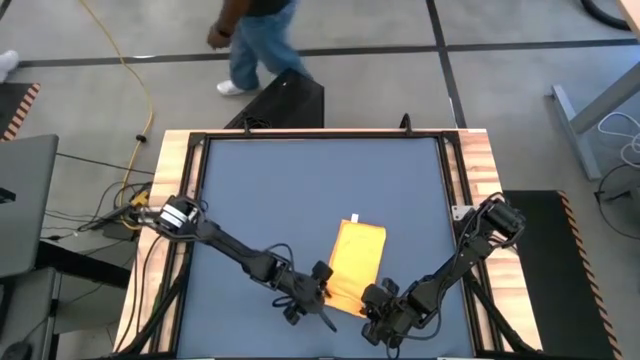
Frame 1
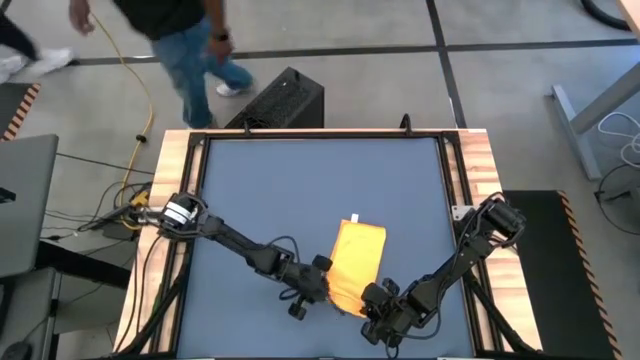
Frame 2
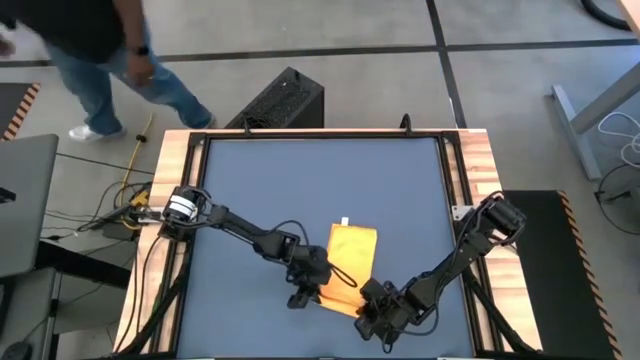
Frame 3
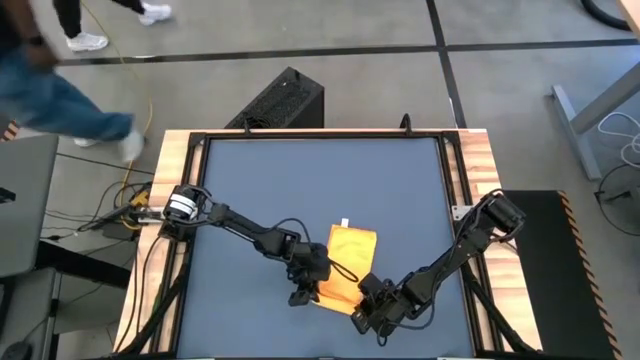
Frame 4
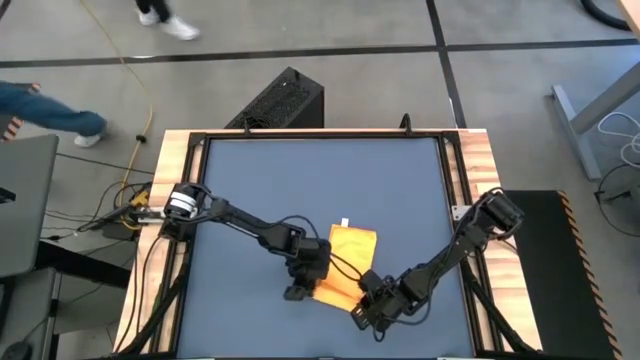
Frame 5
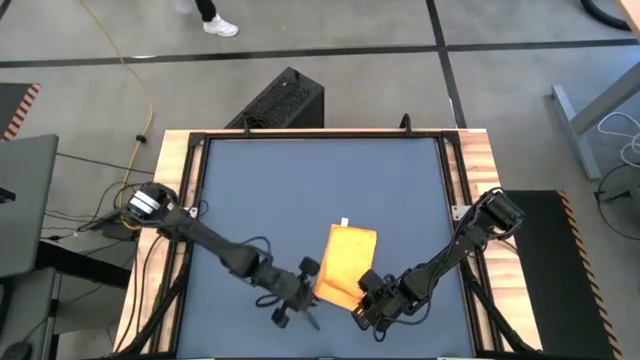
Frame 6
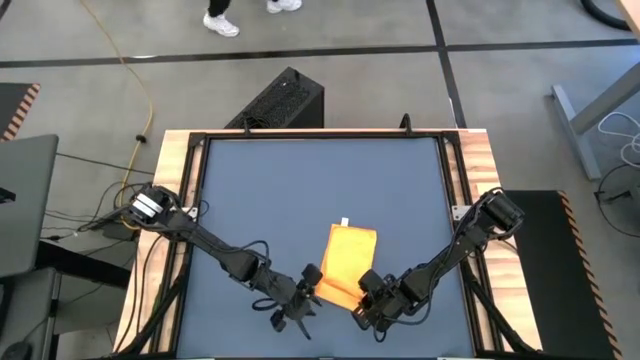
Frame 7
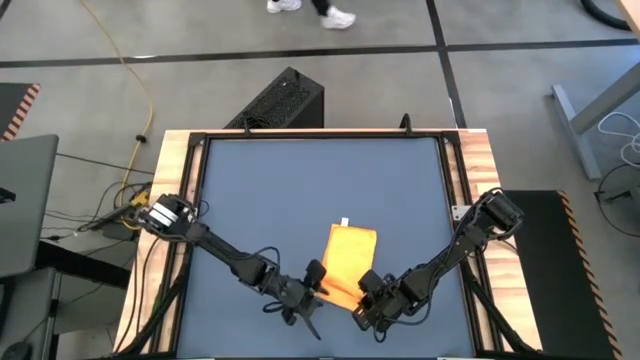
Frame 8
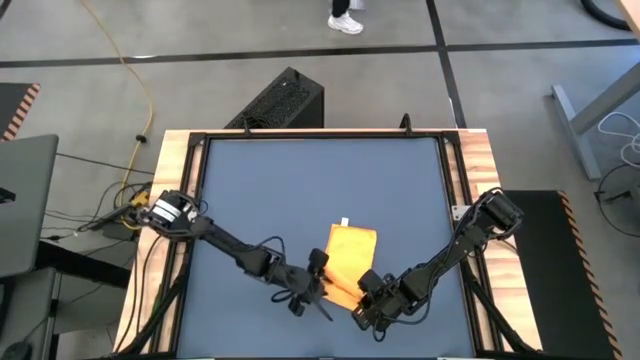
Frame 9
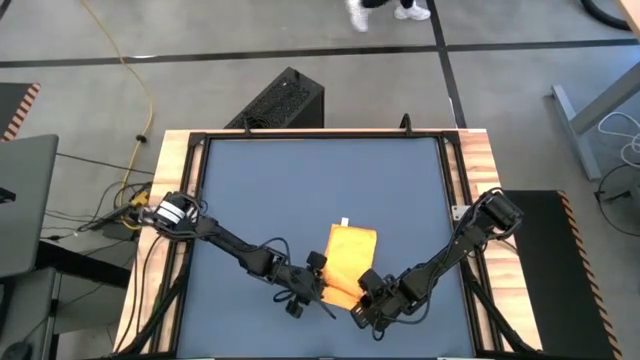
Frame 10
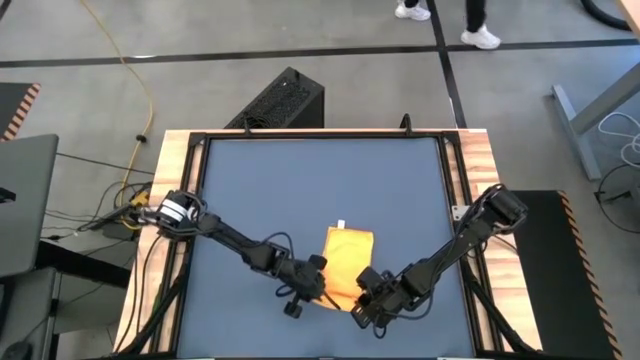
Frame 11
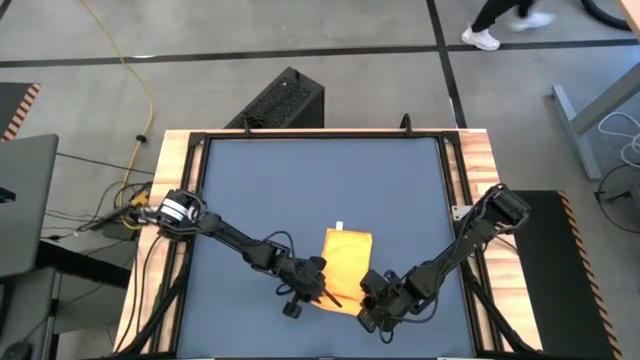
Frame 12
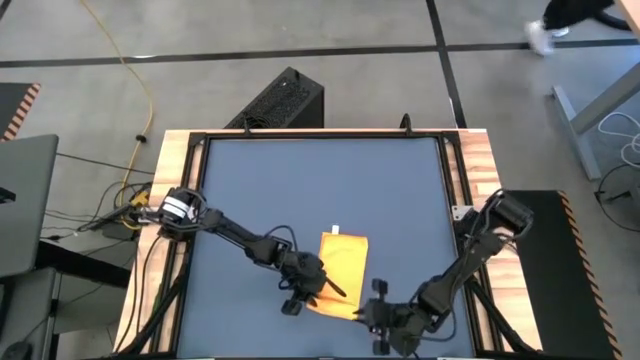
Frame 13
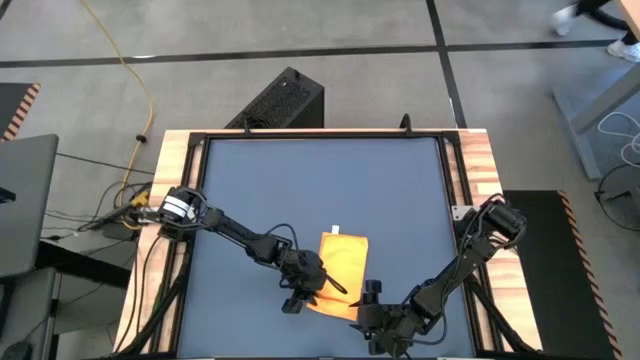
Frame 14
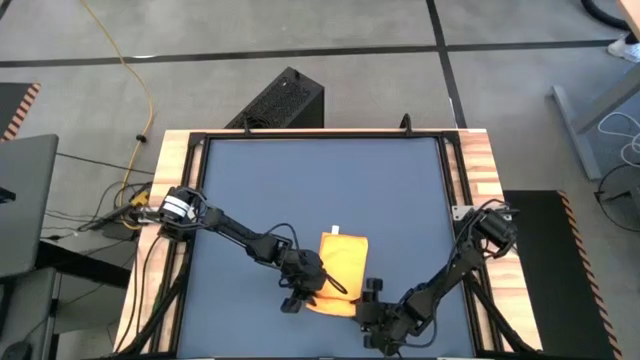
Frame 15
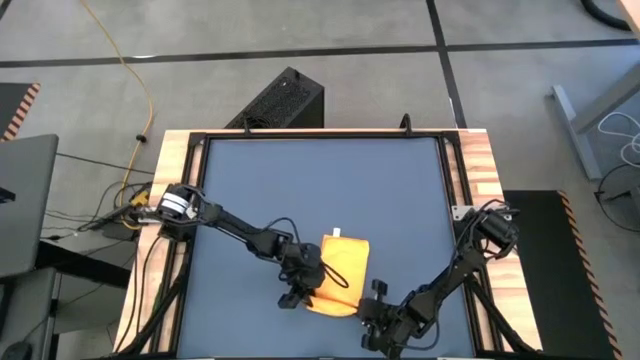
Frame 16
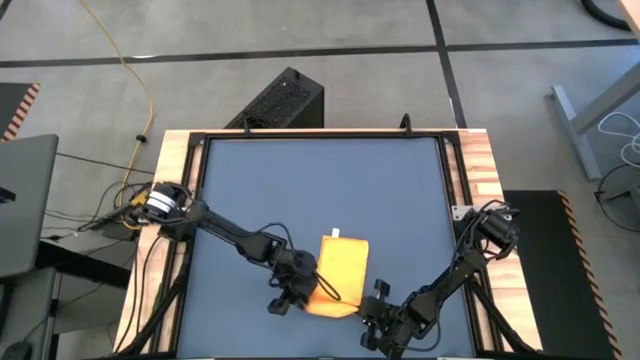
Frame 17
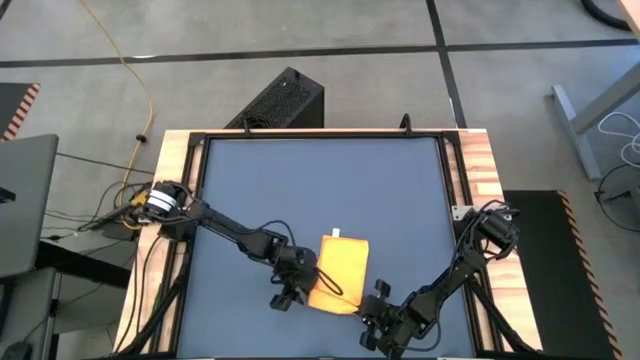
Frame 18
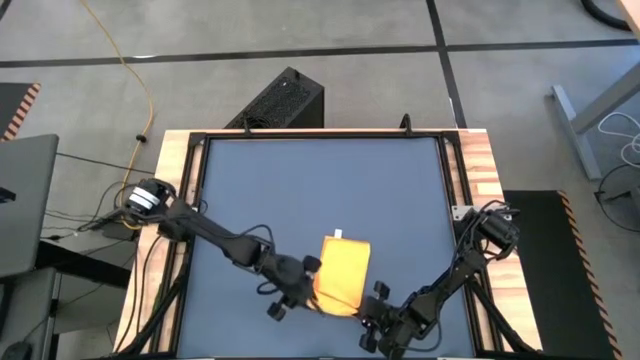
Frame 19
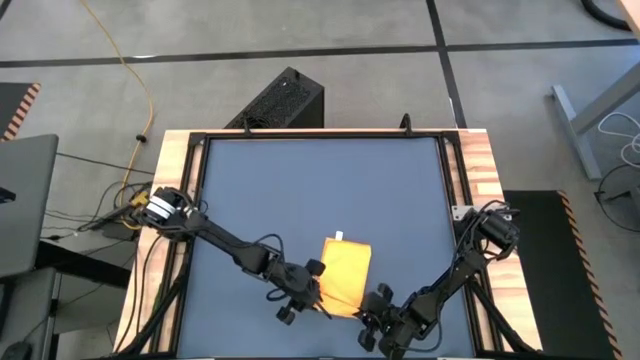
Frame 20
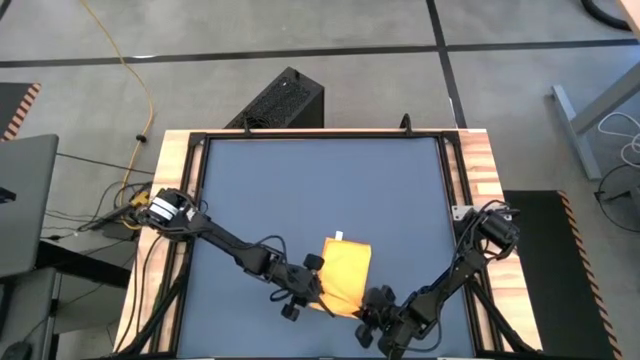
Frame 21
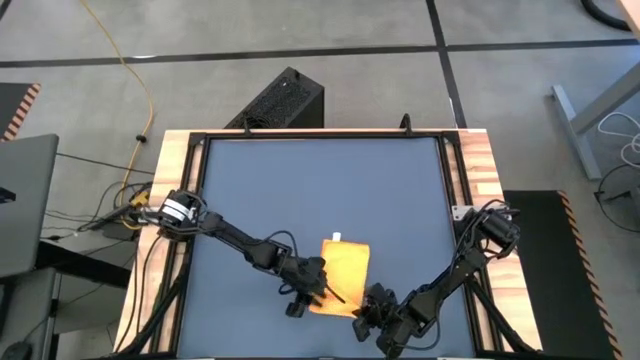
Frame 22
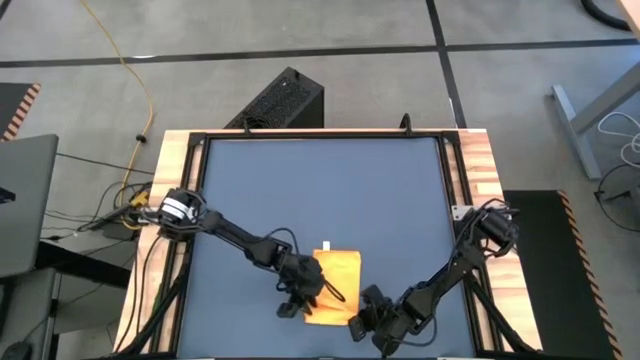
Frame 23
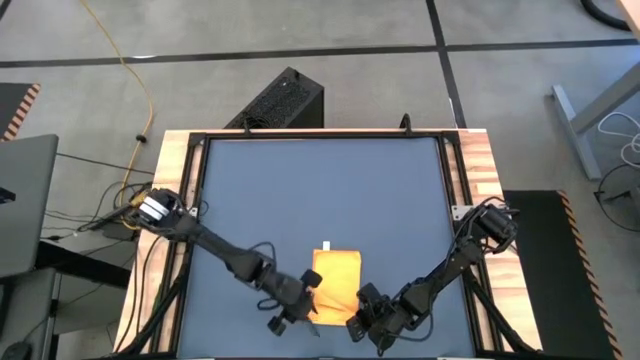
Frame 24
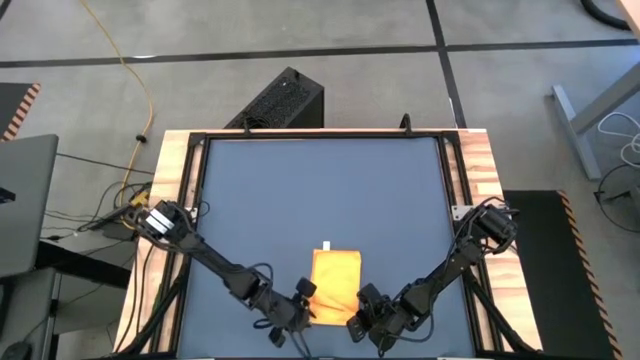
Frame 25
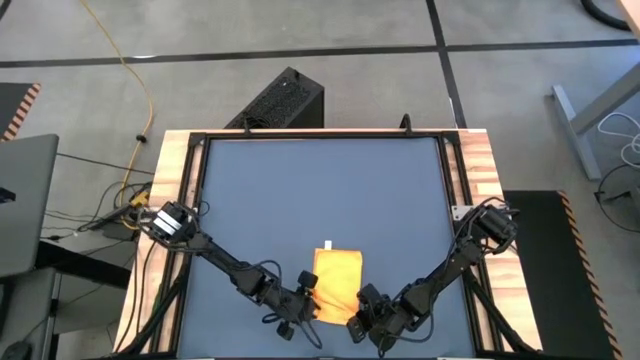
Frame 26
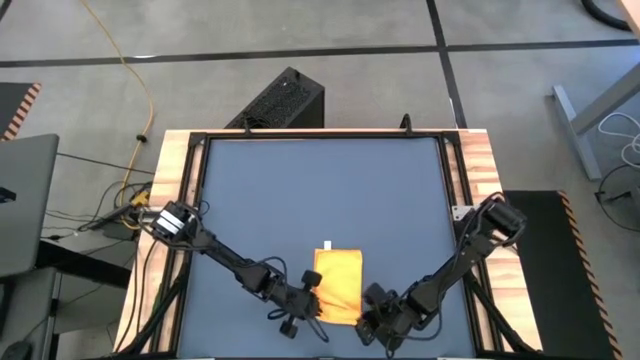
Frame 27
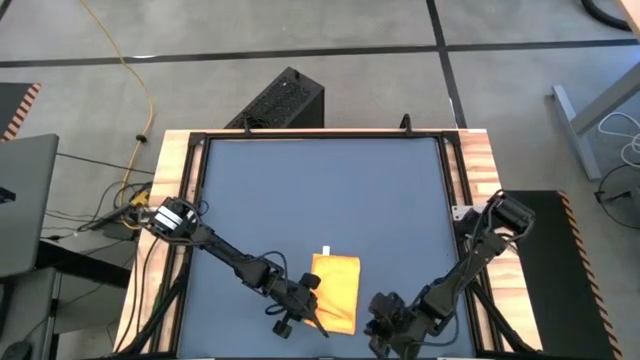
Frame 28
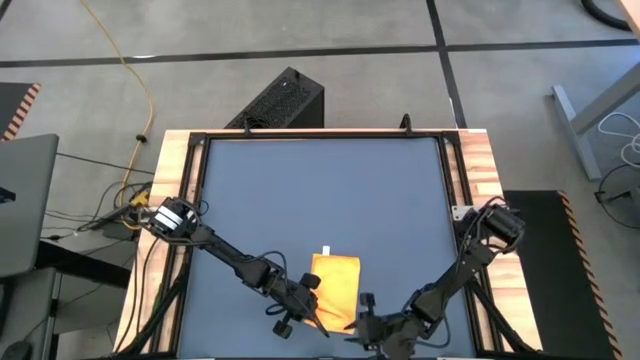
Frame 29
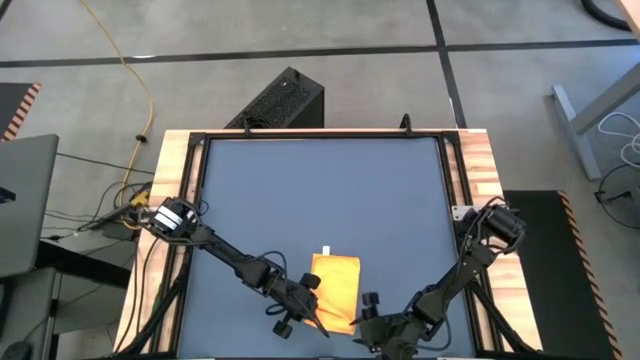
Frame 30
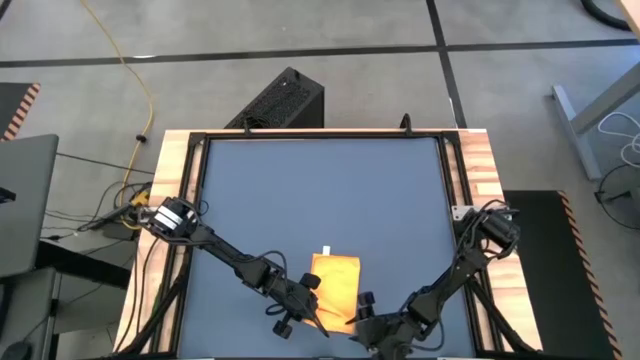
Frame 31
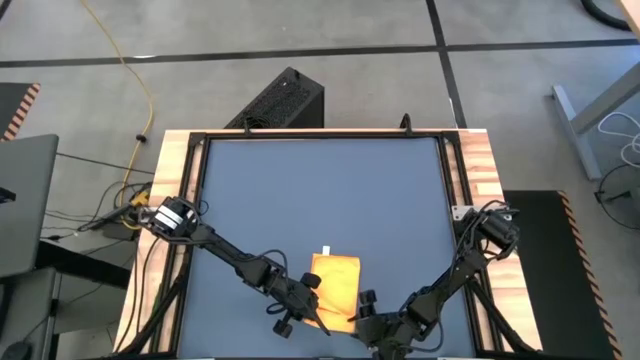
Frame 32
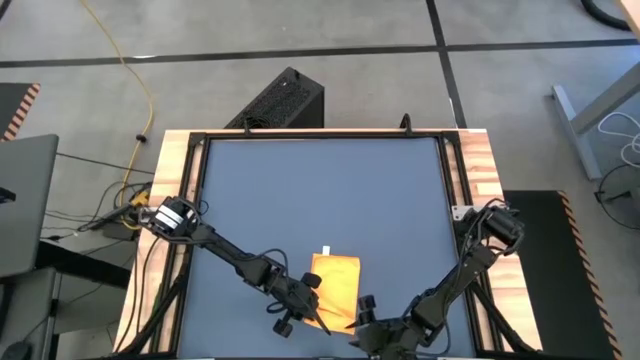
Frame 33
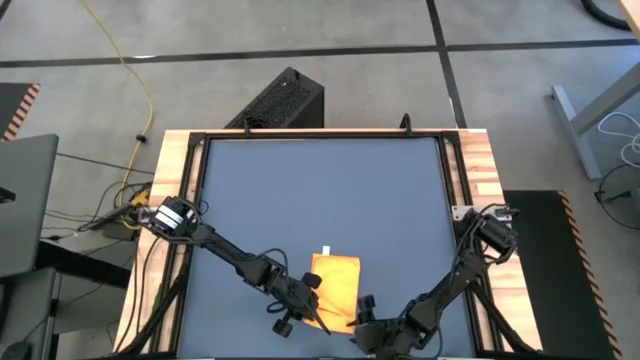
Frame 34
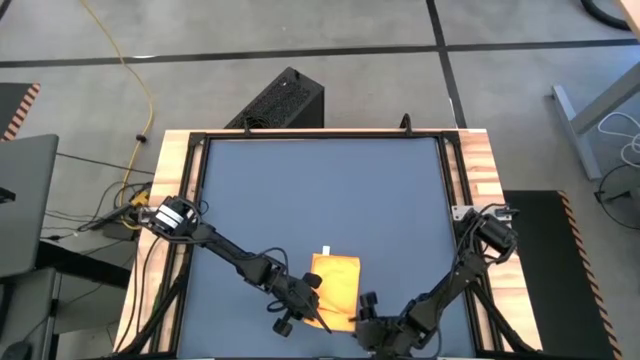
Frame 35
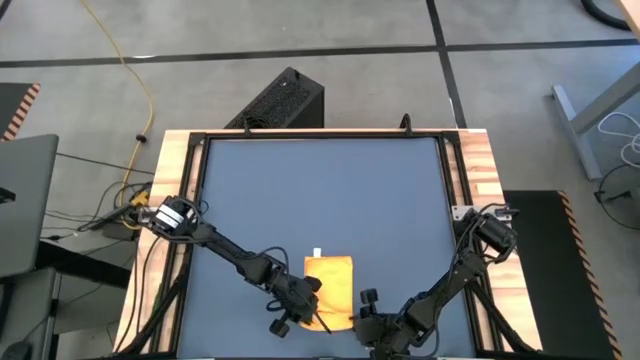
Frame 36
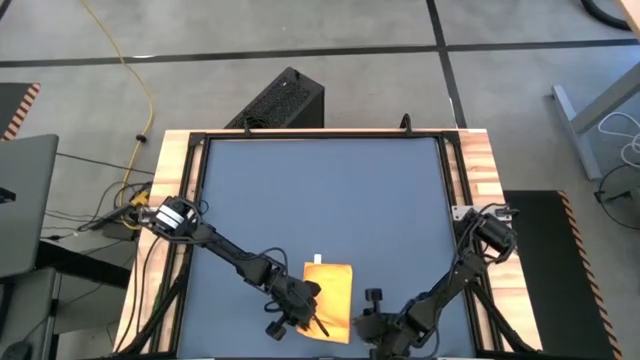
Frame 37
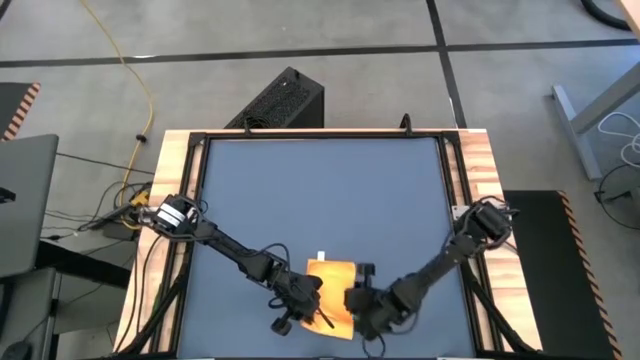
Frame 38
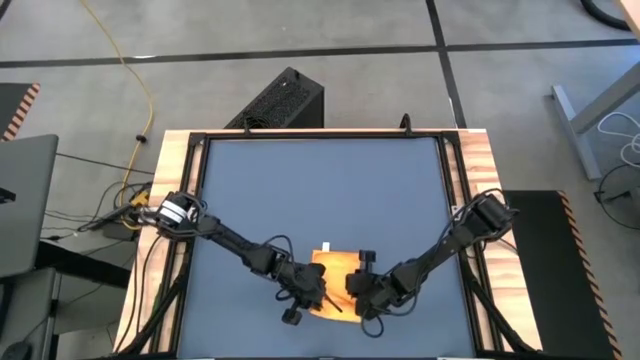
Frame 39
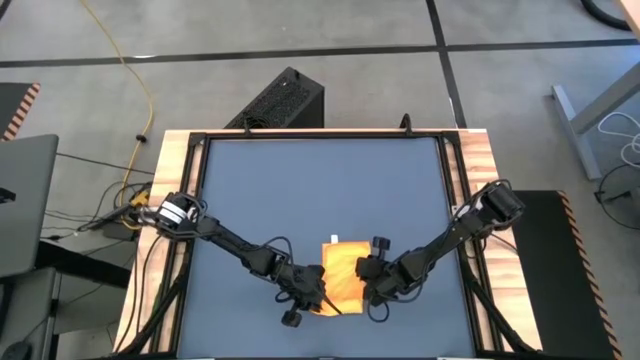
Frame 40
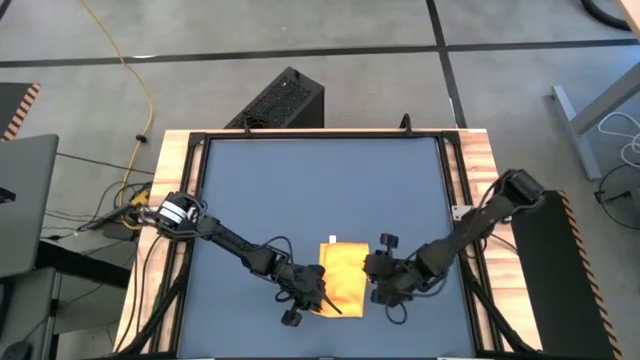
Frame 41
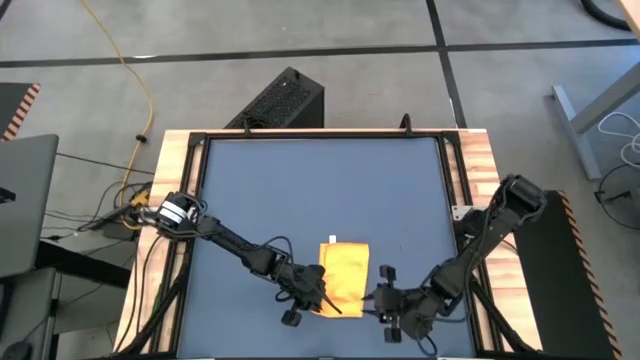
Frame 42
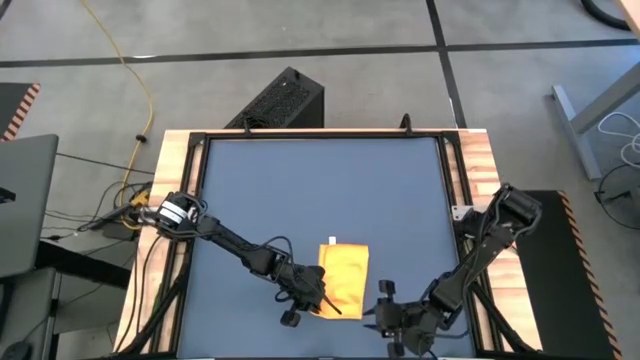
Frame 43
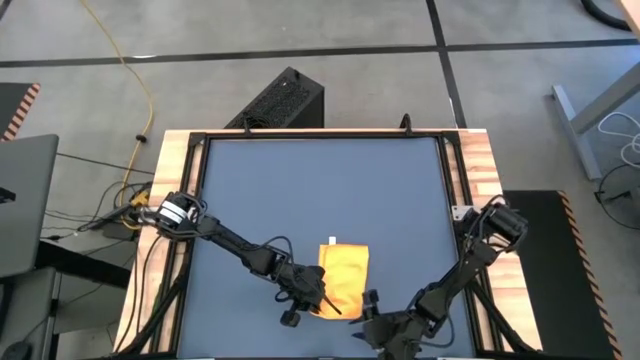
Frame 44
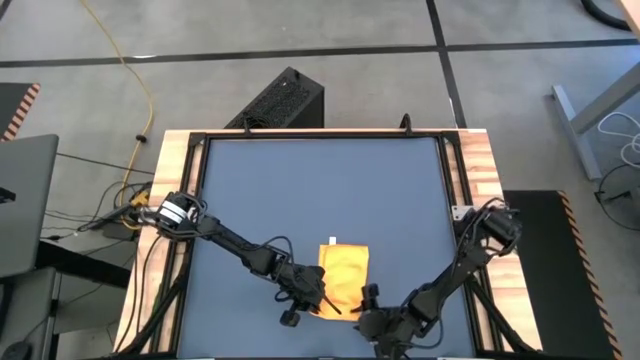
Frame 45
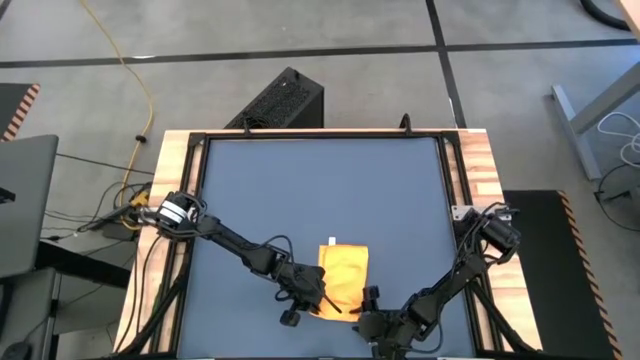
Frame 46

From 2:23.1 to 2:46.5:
Task: Roll towel into tight, uniform cylinder
Roll the orange towel
